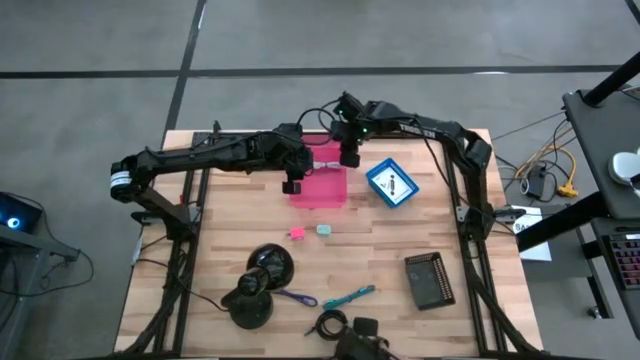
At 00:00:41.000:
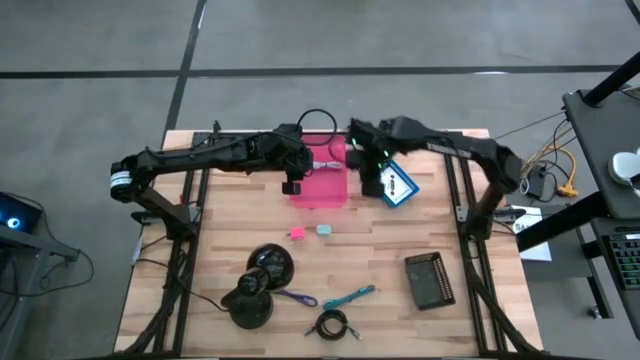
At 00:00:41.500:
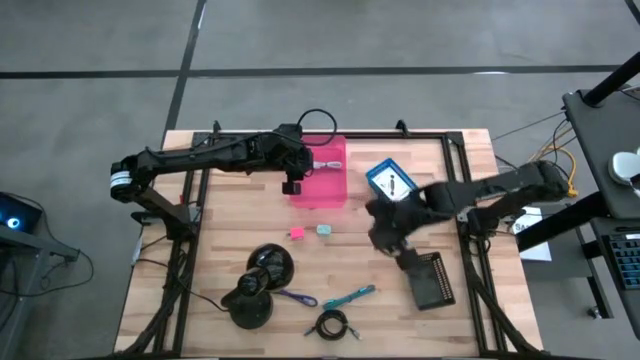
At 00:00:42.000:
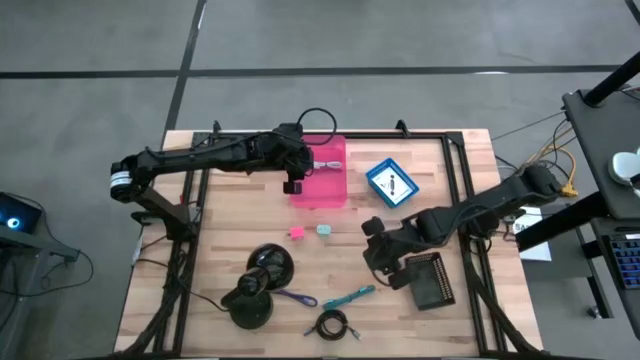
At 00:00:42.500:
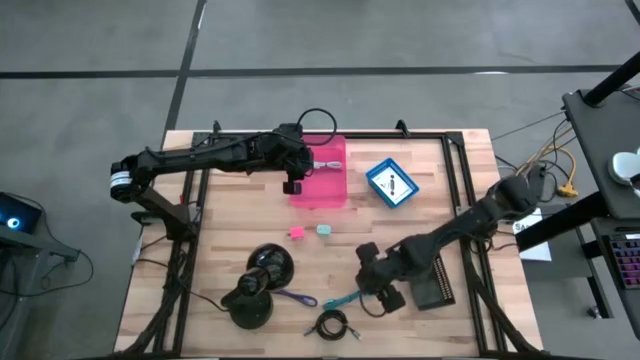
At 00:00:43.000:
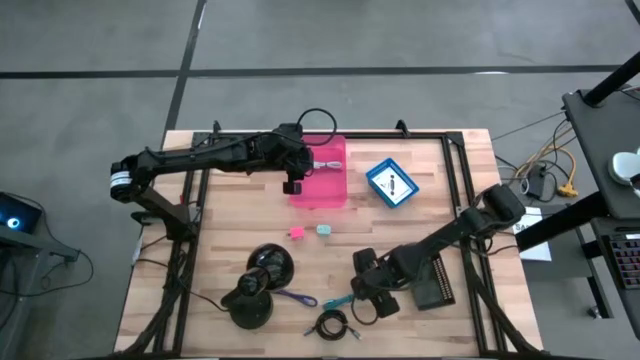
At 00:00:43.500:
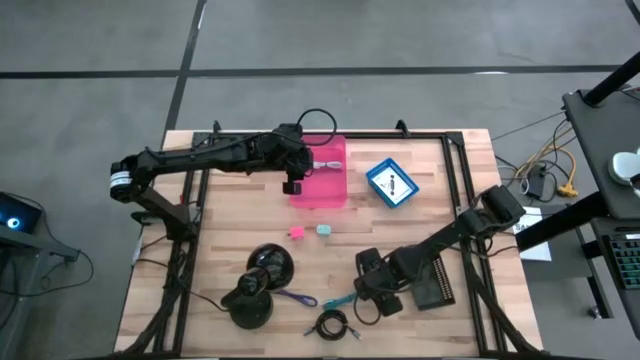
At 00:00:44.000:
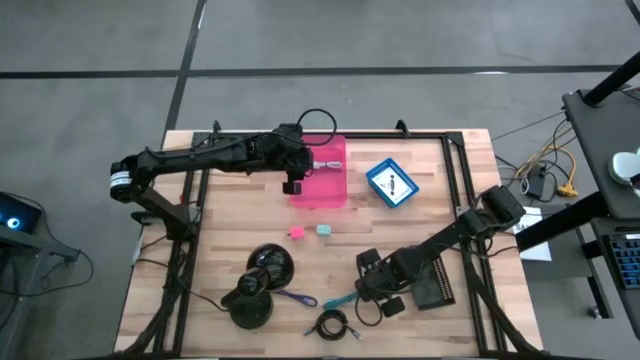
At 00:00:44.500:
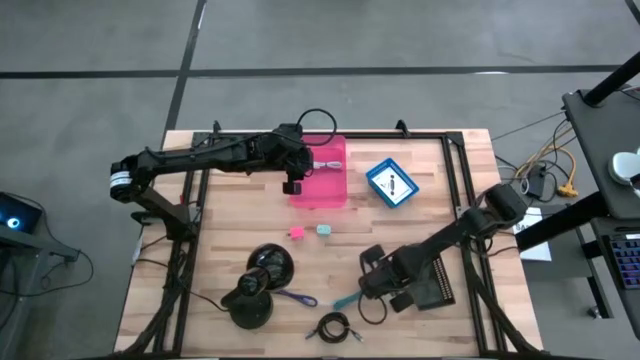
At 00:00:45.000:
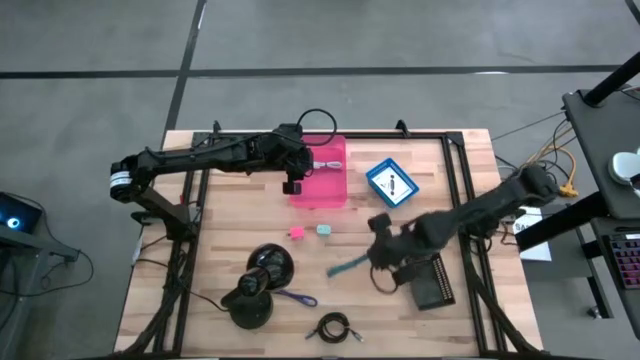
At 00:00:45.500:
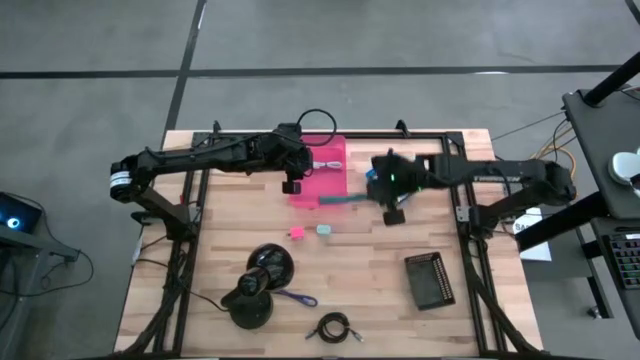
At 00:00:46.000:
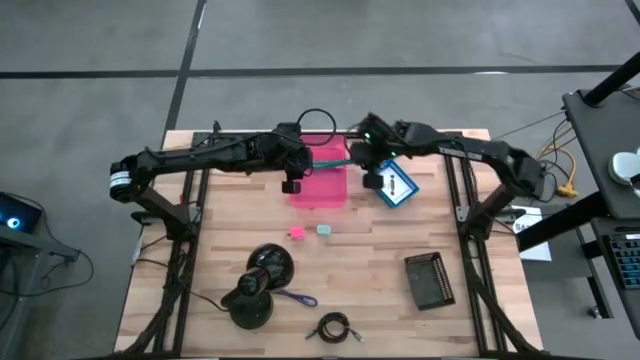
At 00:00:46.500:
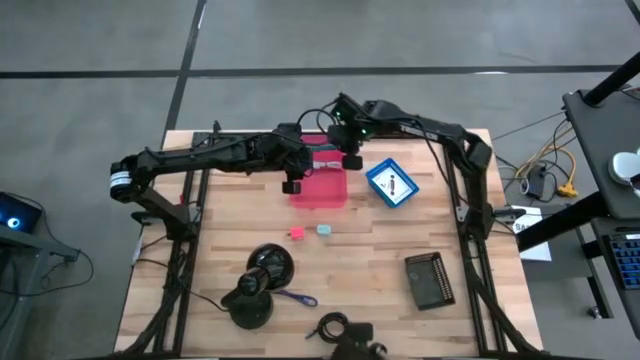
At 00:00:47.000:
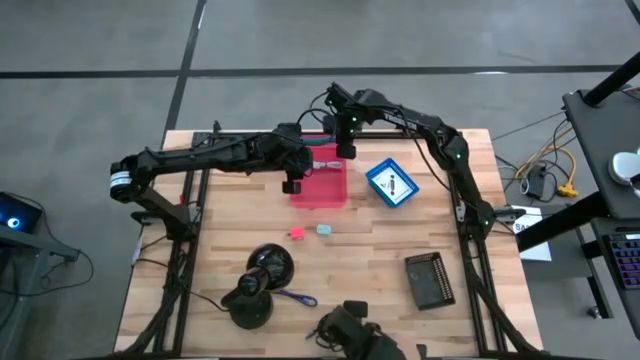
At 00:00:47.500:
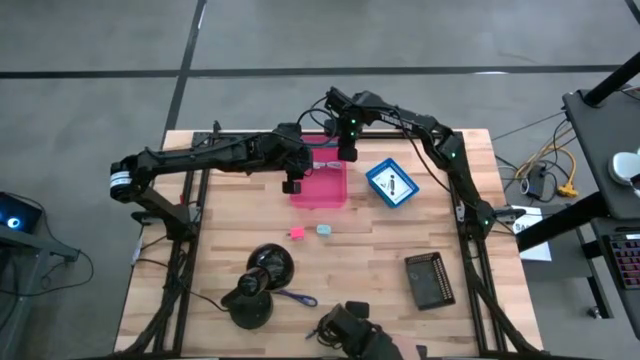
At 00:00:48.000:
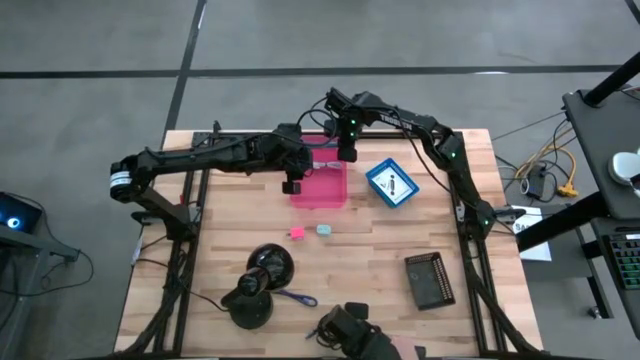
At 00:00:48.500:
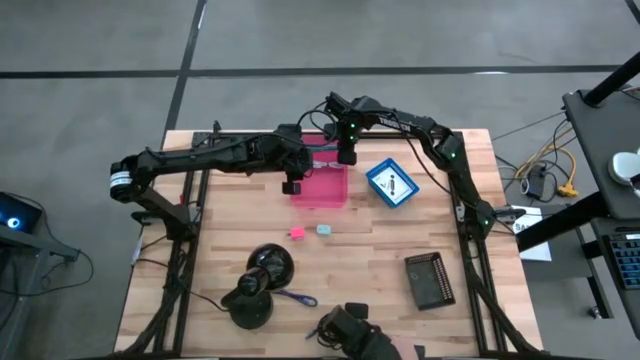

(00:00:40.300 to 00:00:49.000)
Task: Pick and place items into bin
Put the light blue charger cable into the pink bin

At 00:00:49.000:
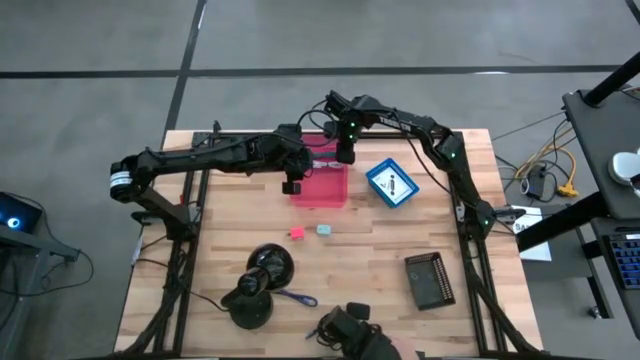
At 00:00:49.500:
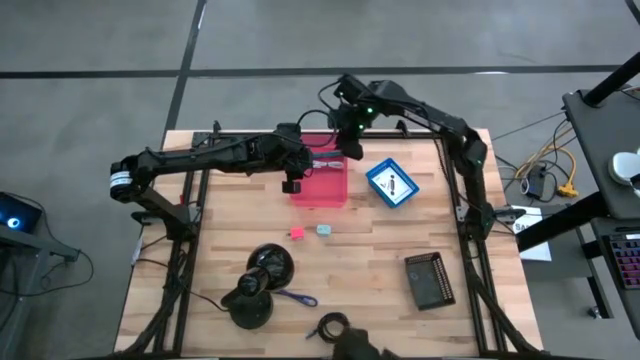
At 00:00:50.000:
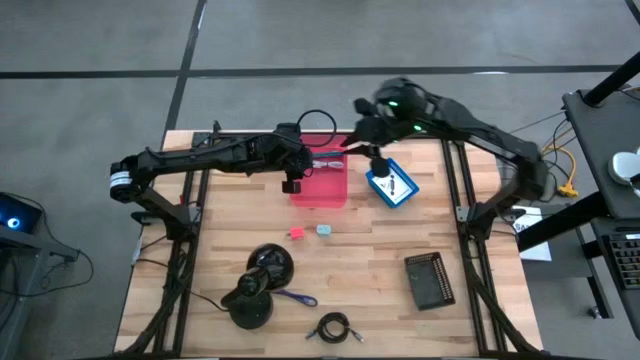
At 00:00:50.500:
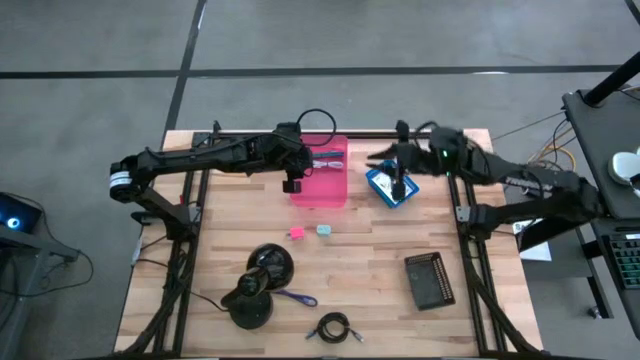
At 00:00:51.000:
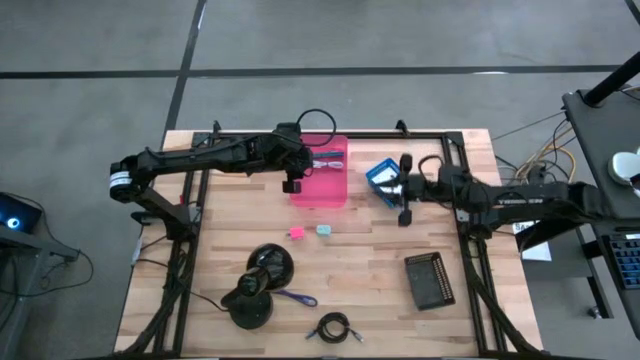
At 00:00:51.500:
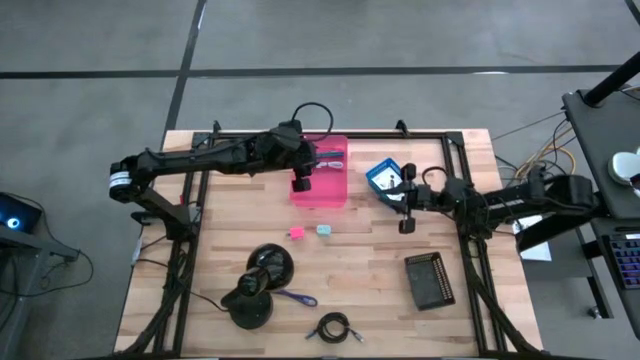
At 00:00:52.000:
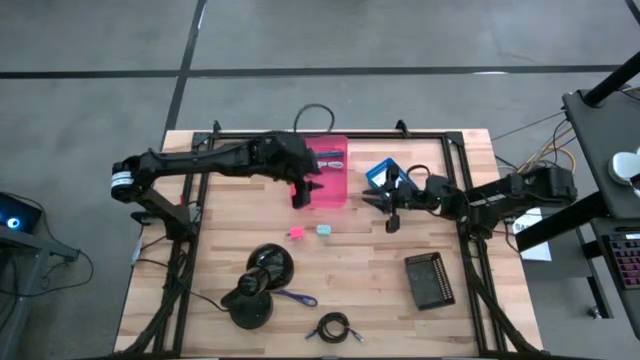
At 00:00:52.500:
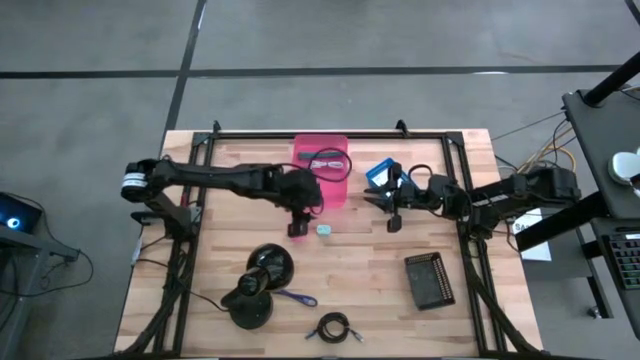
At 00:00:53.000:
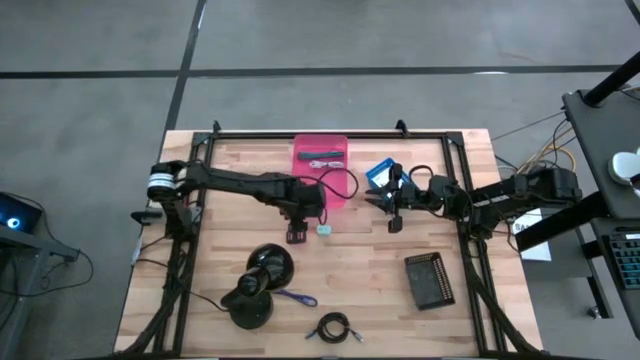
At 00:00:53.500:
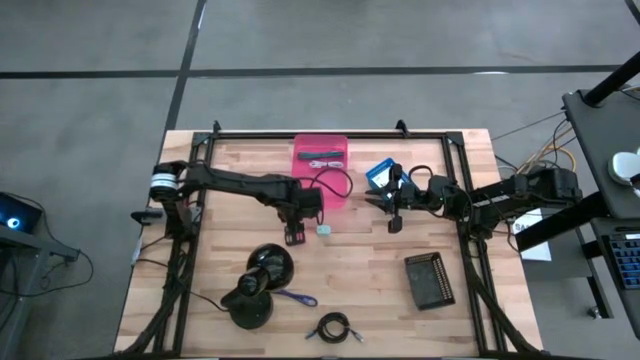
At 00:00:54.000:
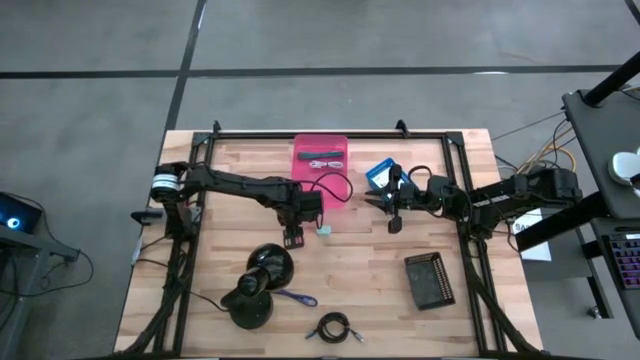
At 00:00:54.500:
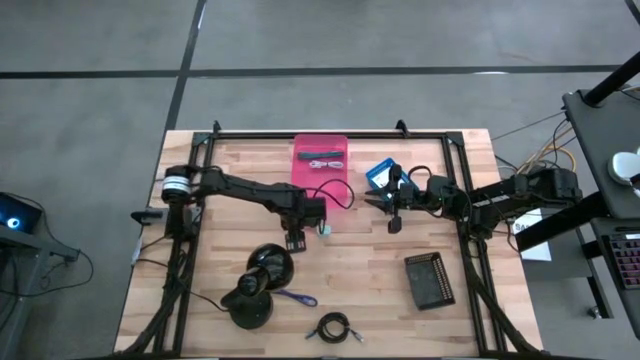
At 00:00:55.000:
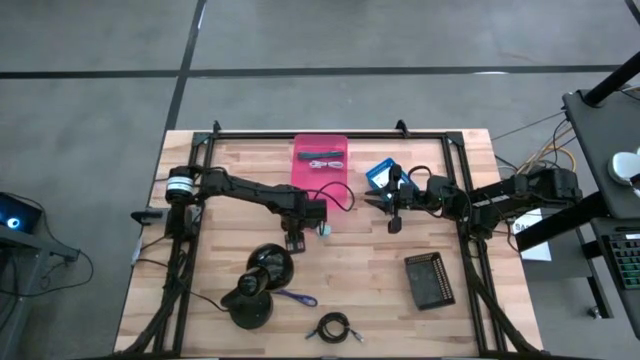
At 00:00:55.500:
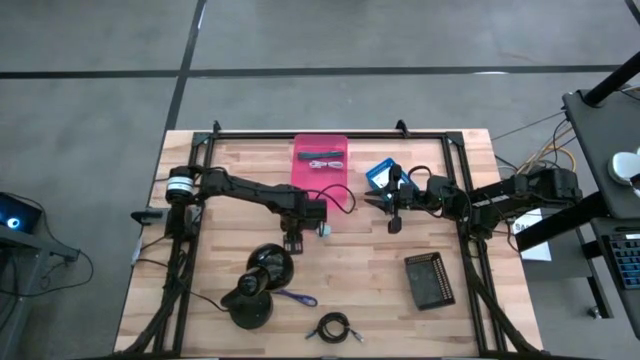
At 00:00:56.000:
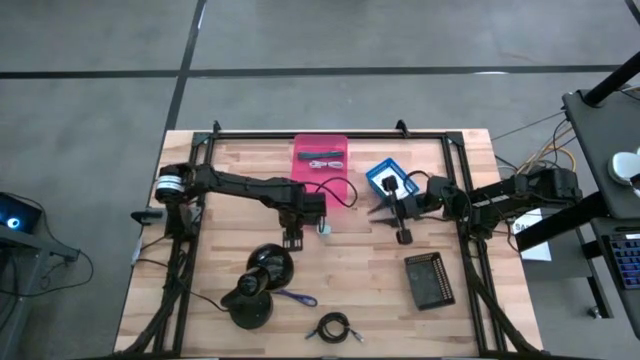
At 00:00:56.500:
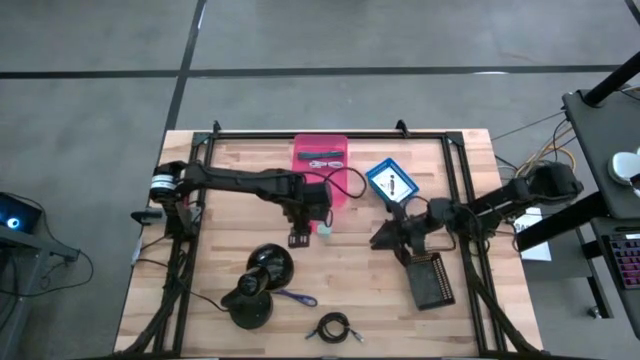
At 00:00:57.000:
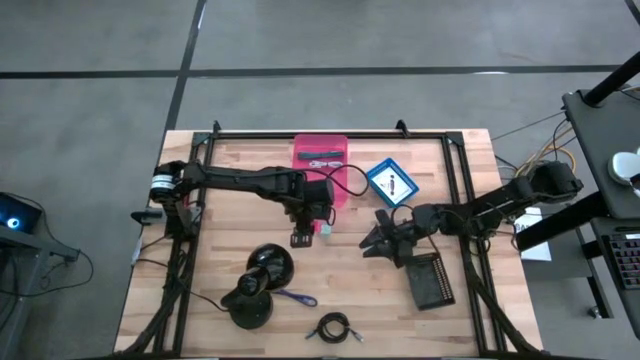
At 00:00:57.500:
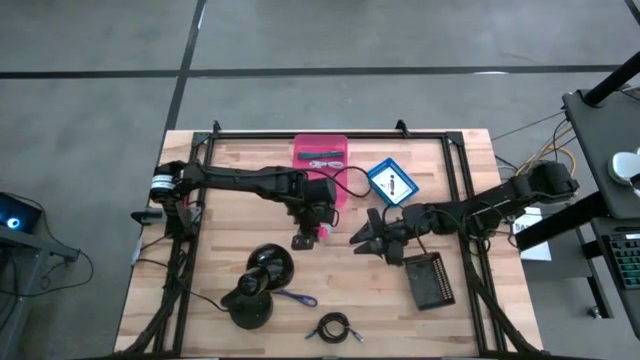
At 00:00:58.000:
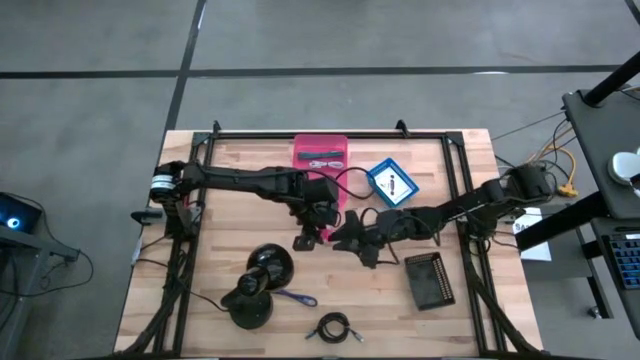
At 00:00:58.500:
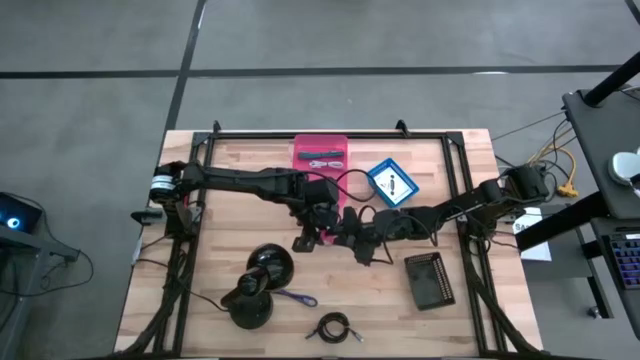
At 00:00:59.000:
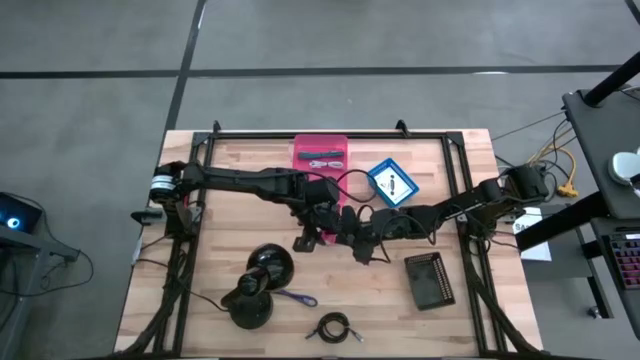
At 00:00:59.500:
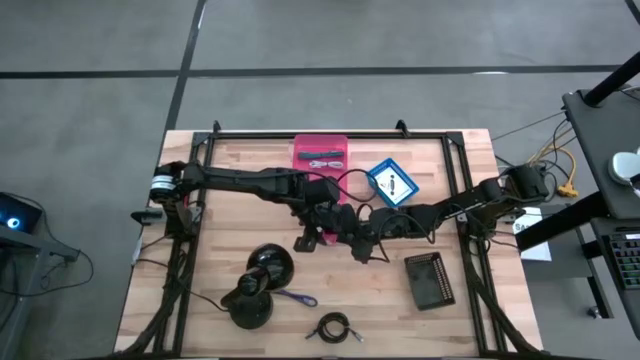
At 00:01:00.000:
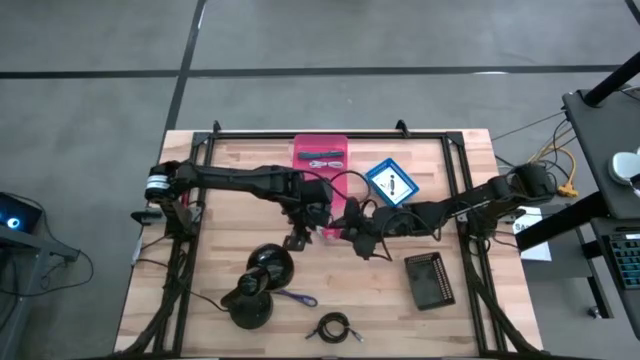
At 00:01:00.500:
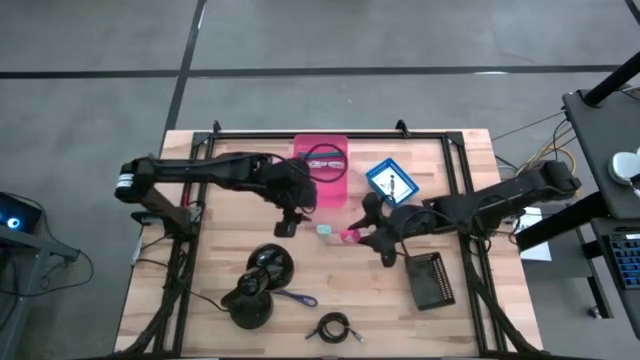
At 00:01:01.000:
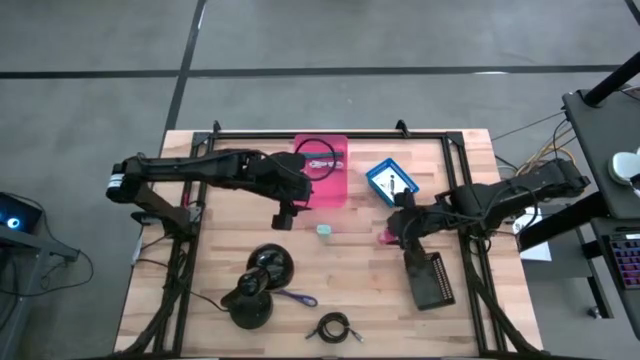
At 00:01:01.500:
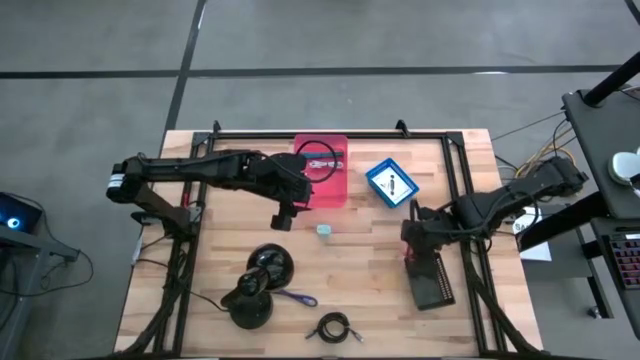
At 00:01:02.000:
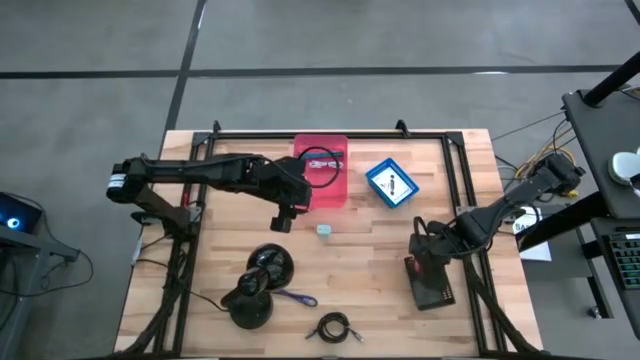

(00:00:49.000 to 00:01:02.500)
Put the pink charger adapter into the black bin
